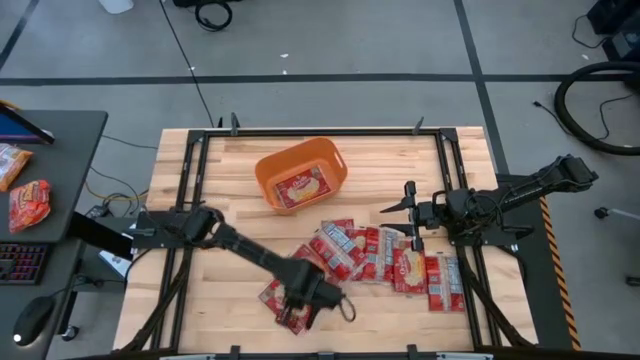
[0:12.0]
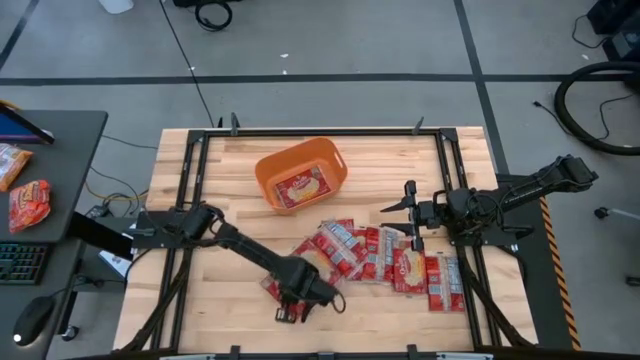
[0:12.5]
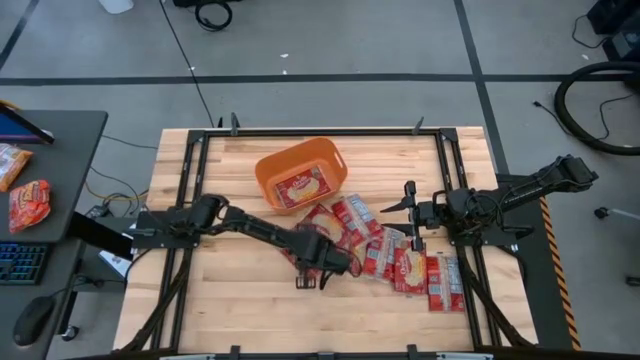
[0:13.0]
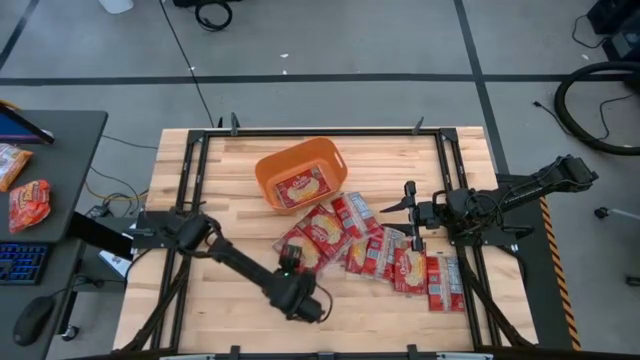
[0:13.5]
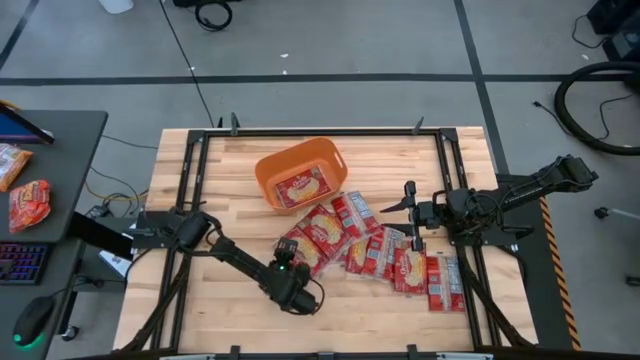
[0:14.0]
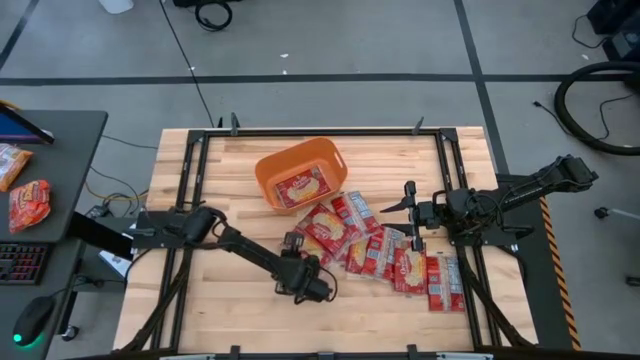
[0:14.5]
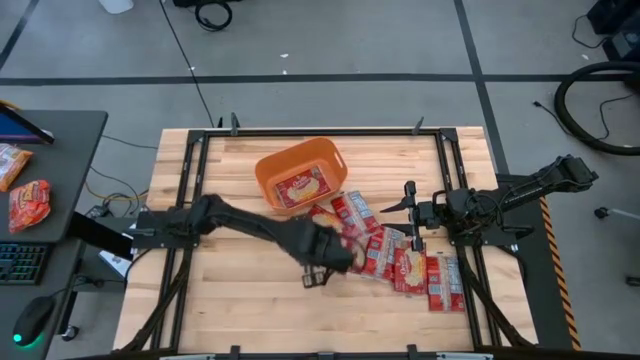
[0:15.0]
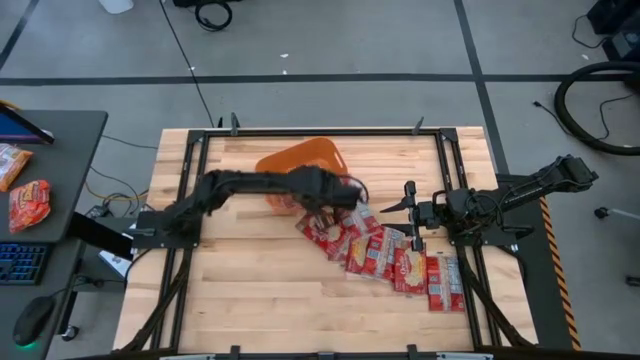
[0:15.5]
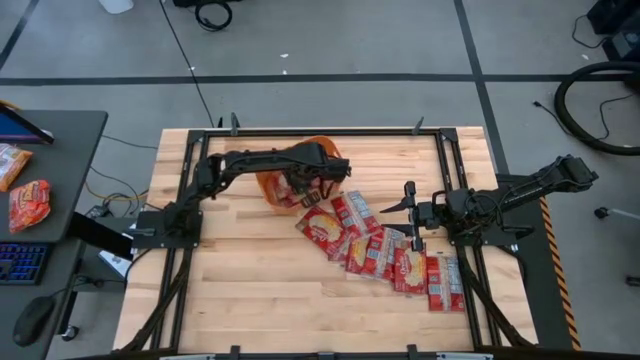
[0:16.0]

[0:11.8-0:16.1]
Task: Sort popcorn bags into baskets
Put the popcorn bag into the orange bin

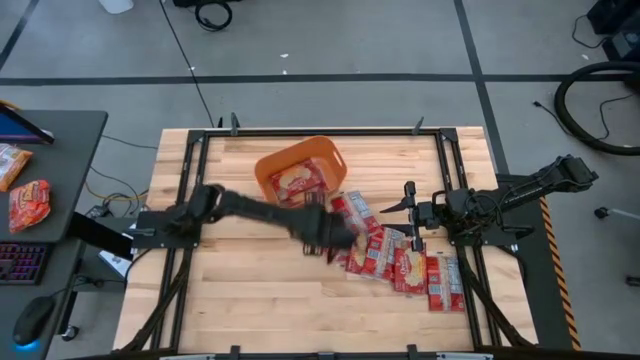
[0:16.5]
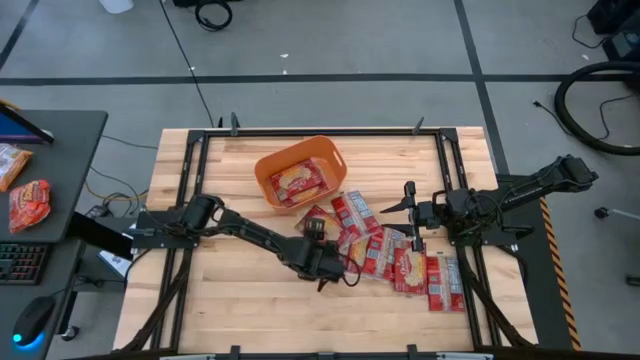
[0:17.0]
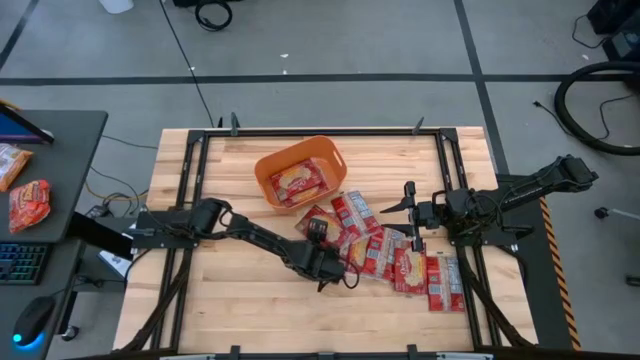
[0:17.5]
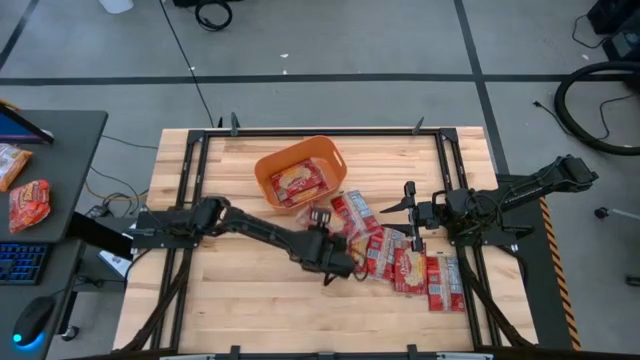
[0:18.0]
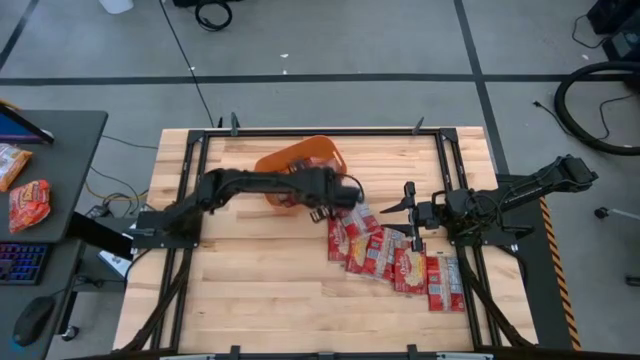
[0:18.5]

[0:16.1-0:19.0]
Put the popcorn bag into the orange bin

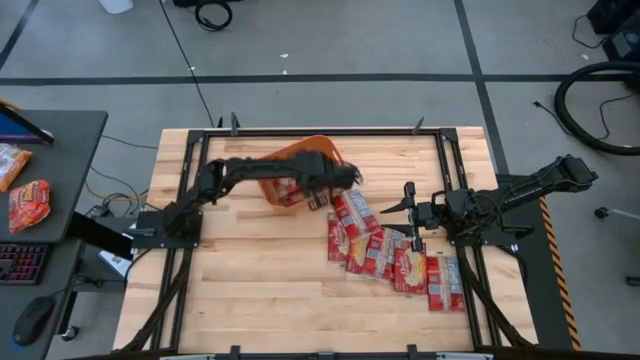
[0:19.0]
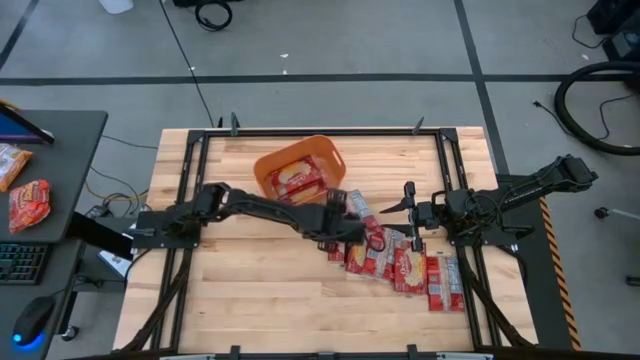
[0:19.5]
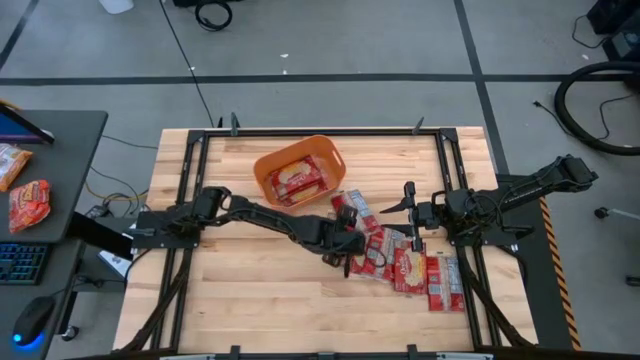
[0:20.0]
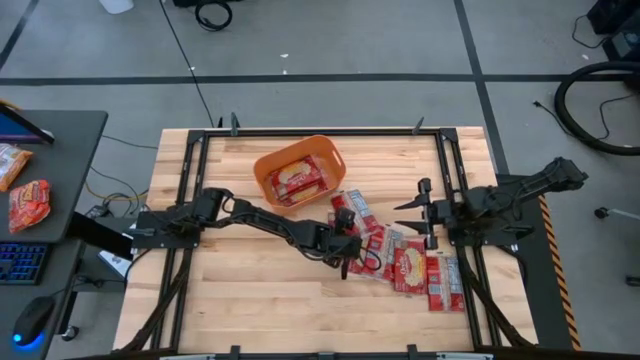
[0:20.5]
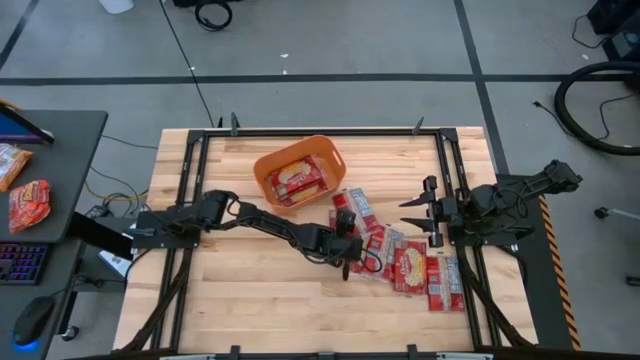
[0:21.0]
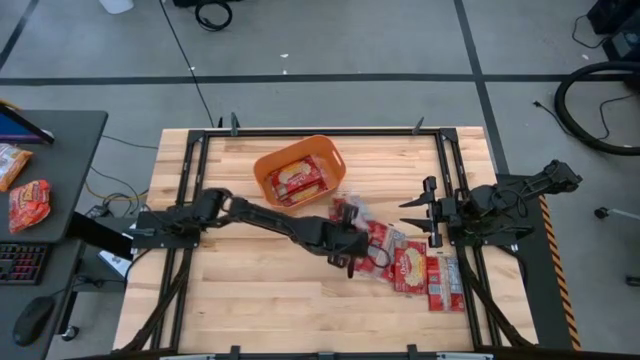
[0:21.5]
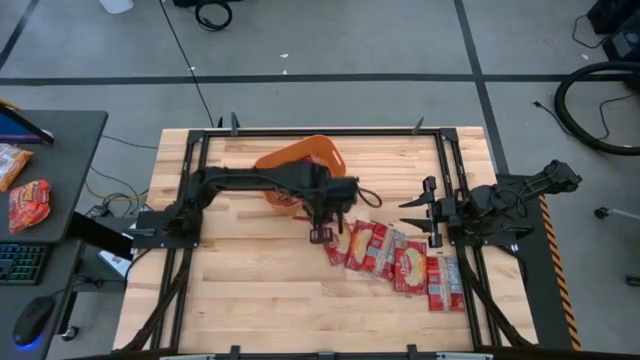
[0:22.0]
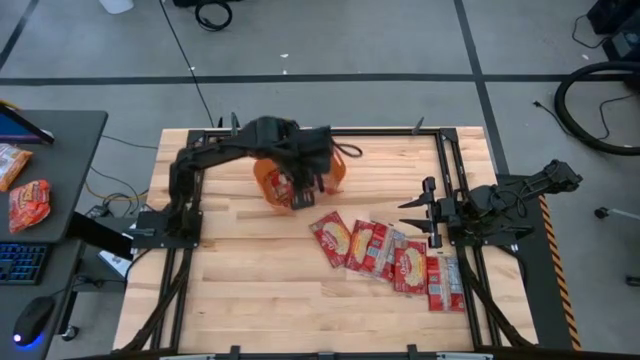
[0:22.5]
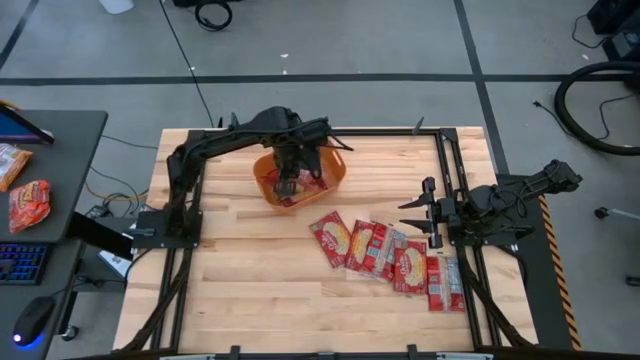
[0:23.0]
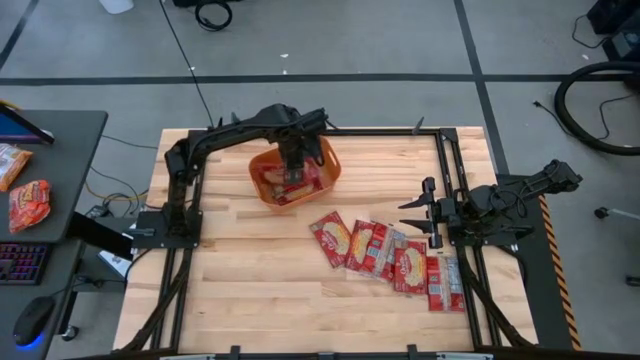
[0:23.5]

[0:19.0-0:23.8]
Put the popcorn bag into the orange bin

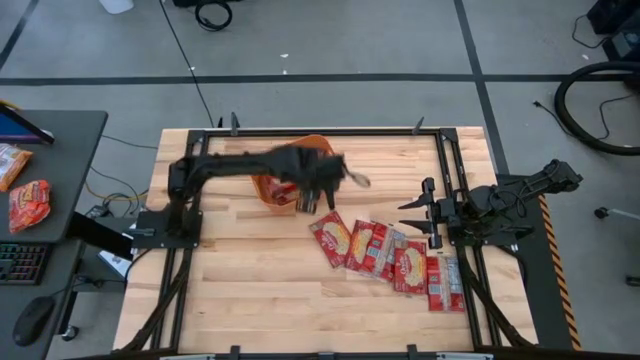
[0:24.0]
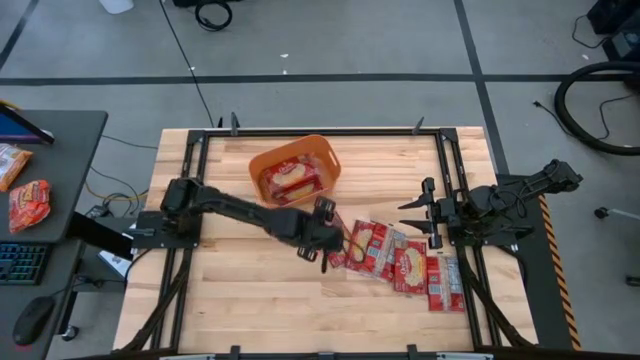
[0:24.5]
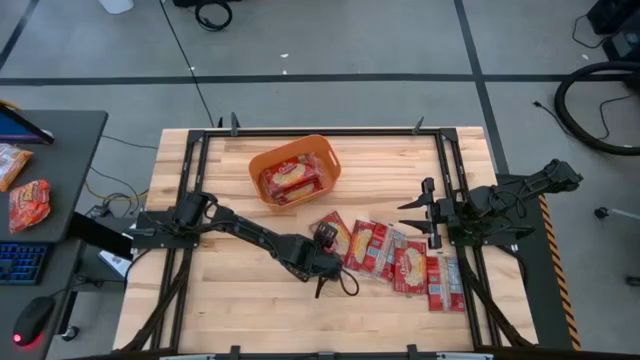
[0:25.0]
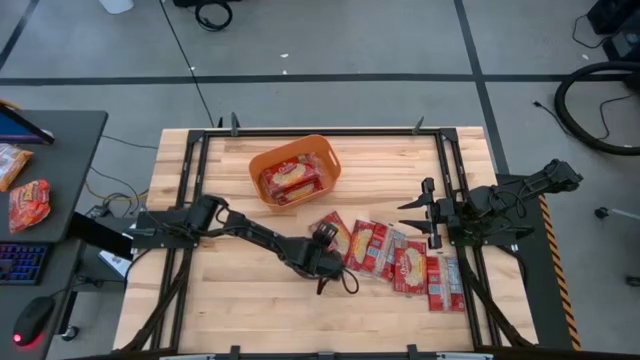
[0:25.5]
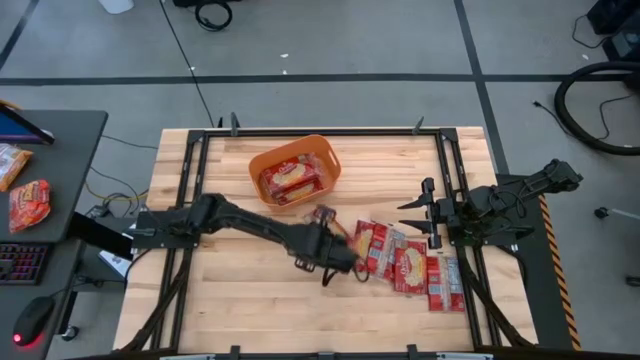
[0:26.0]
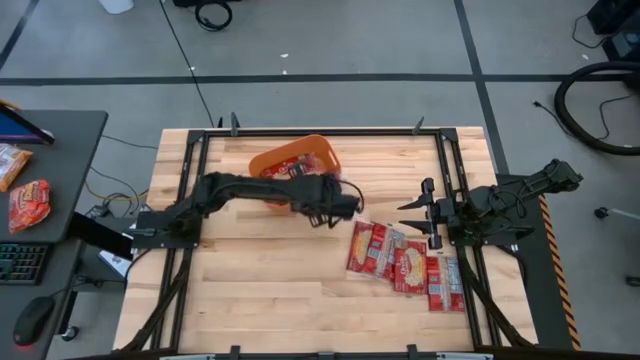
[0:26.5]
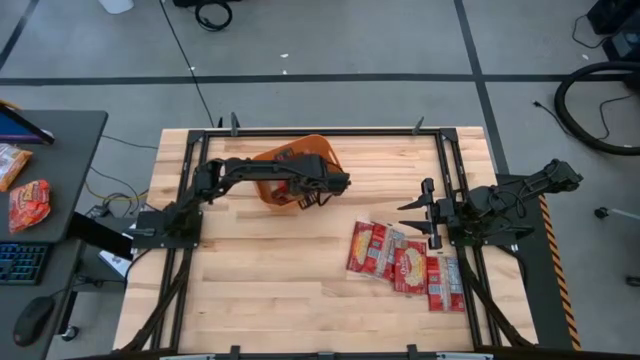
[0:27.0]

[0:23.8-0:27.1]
Put the popcorn bag into the orange bin

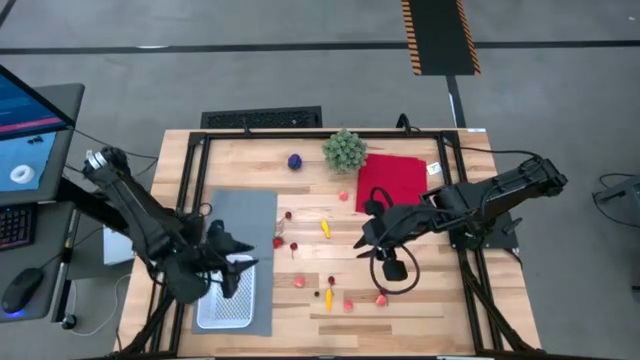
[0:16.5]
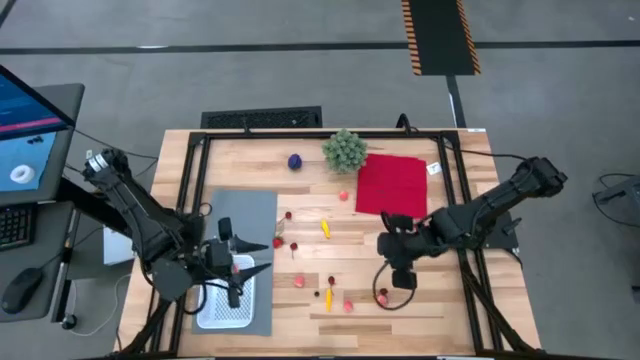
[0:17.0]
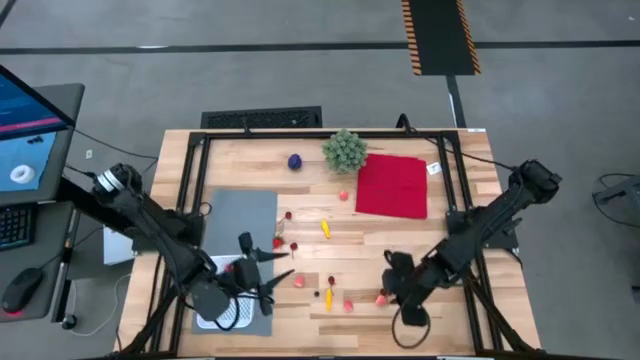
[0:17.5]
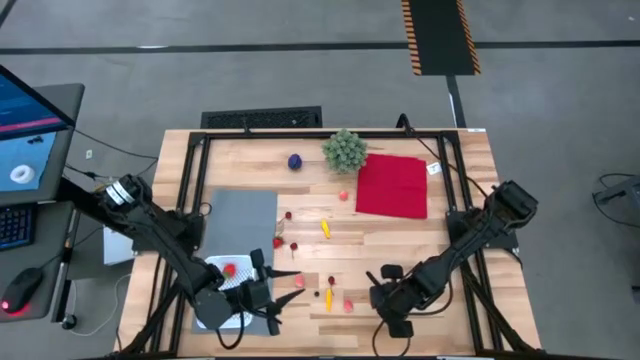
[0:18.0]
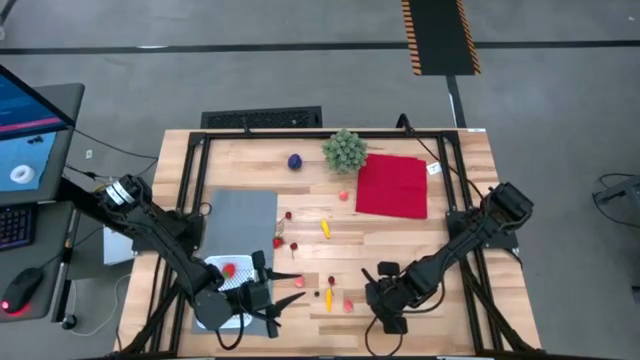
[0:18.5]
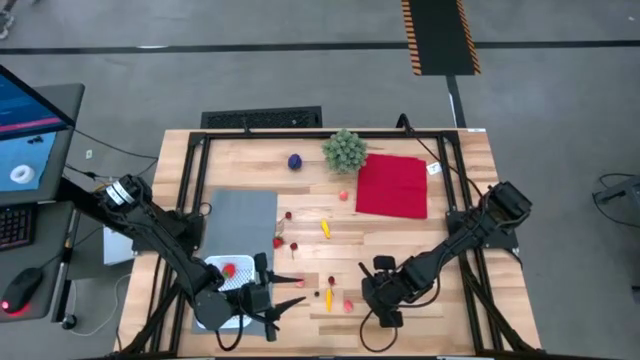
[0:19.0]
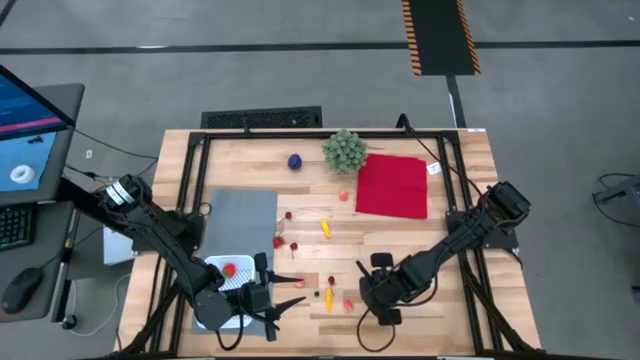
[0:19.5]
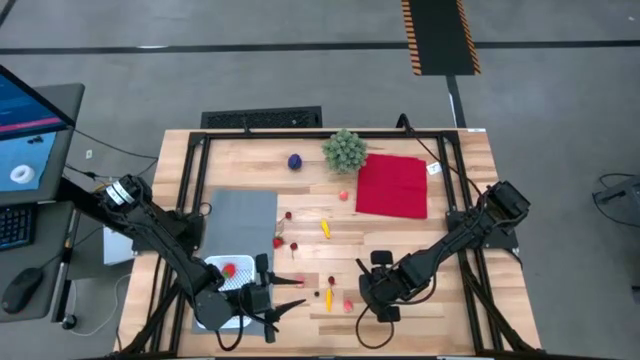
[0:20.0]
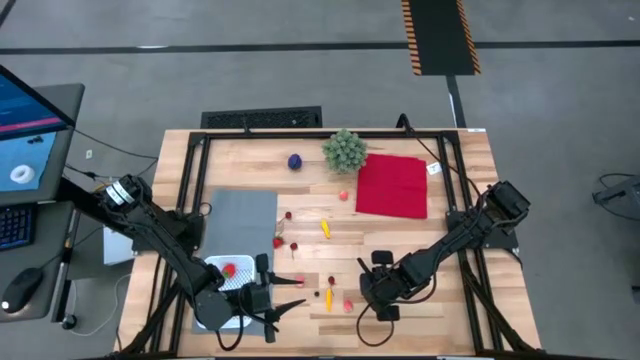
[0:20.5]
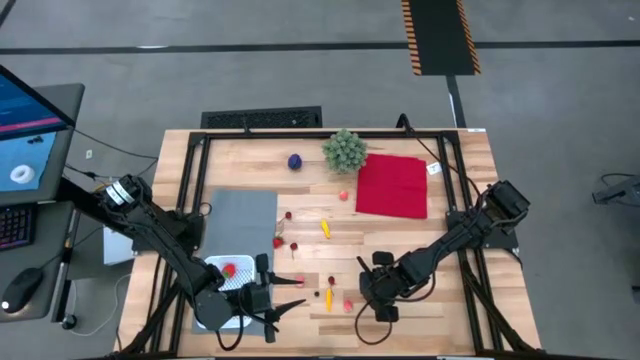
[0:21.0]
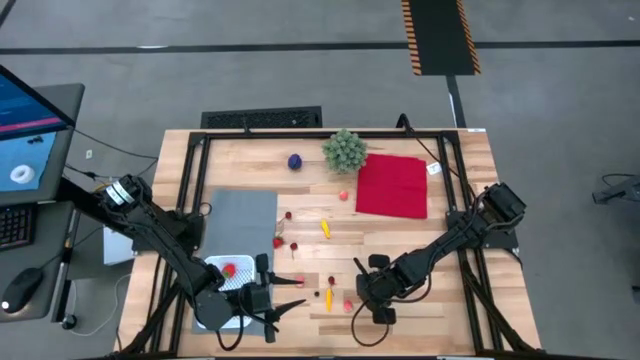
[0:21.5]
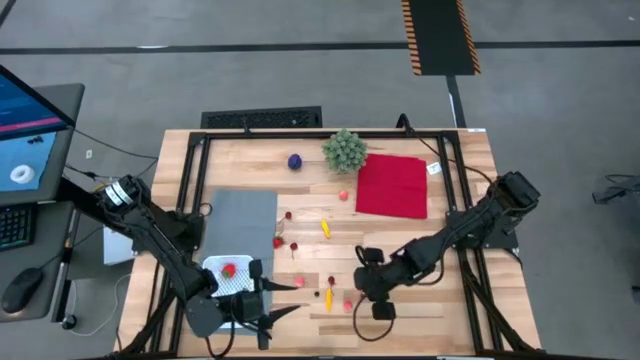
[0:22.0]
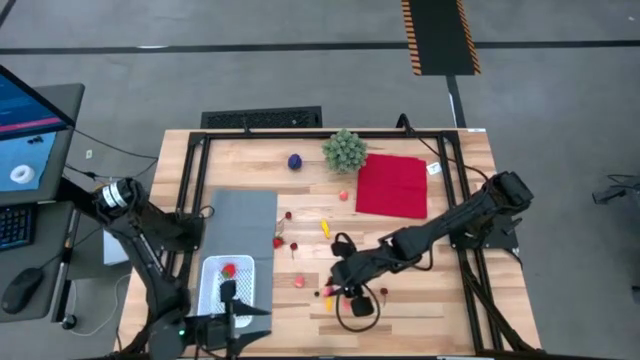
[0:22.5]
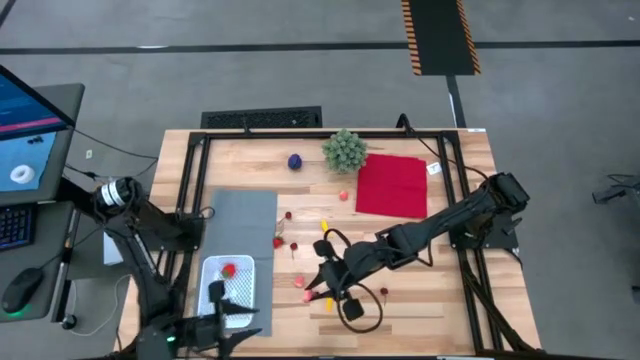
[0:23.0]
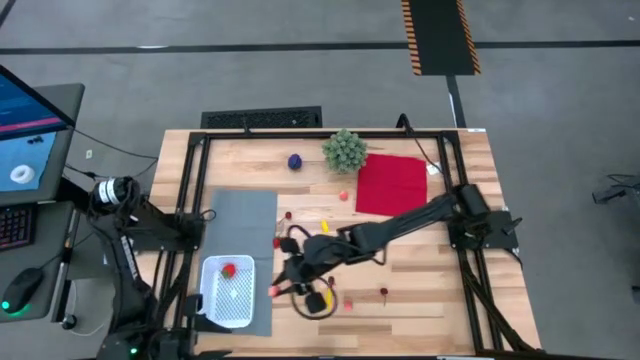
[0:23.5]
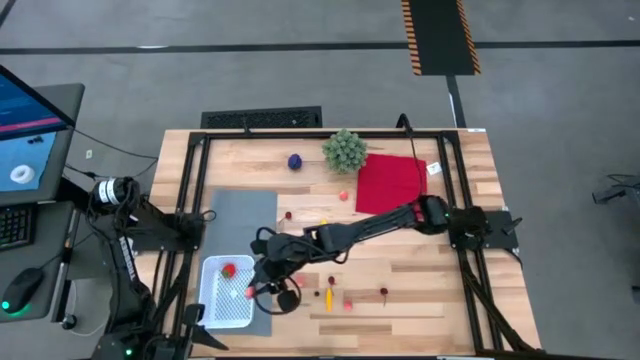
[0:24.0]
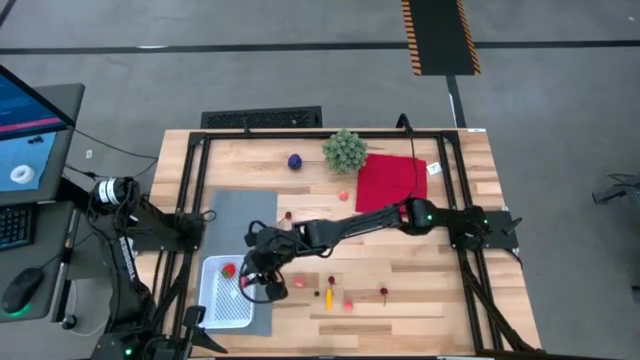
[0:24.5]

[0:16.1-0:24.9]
Task: Pick and placing Produce into tupperware
Put the pink apricot into the white basket
